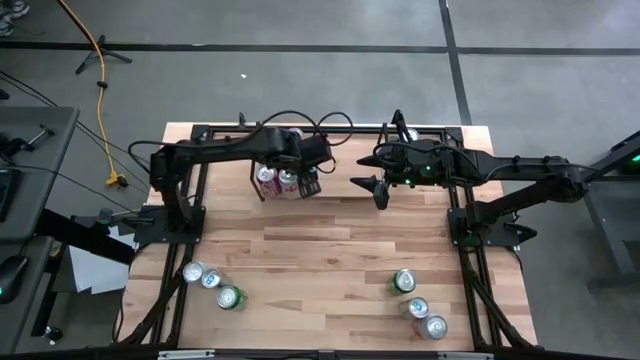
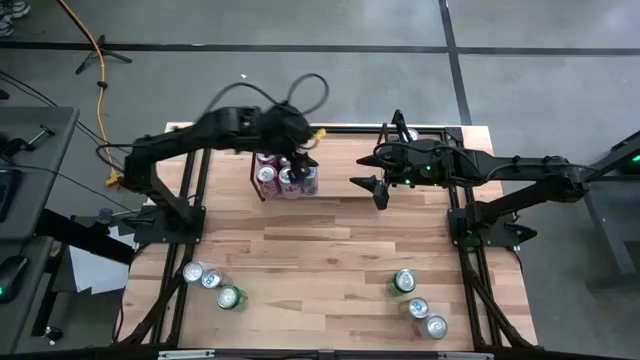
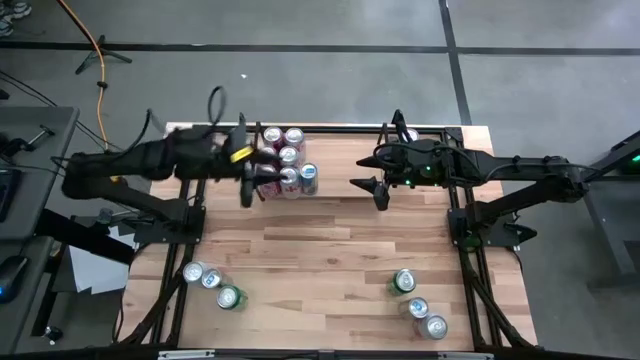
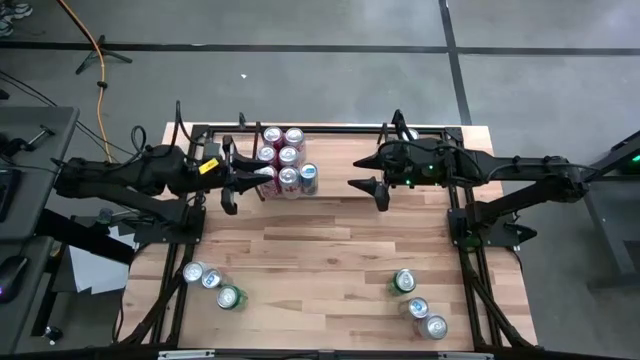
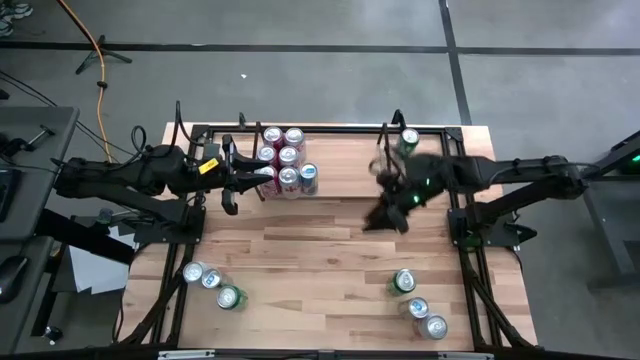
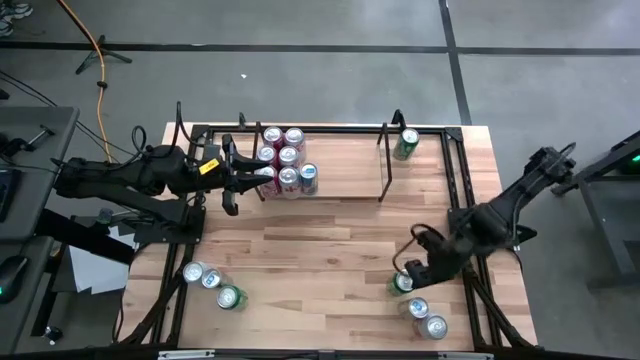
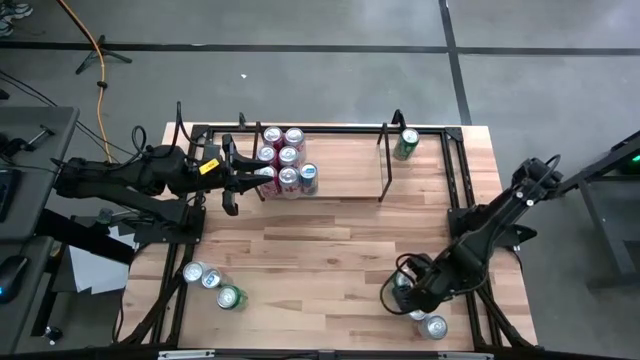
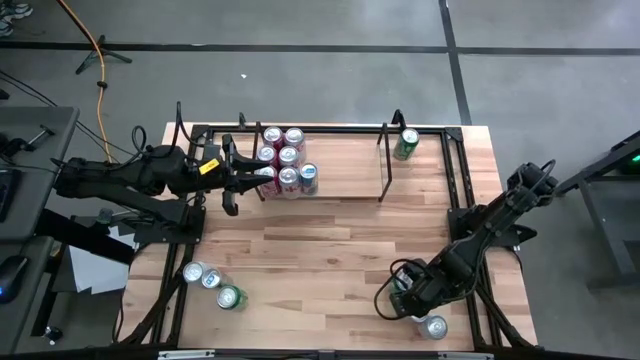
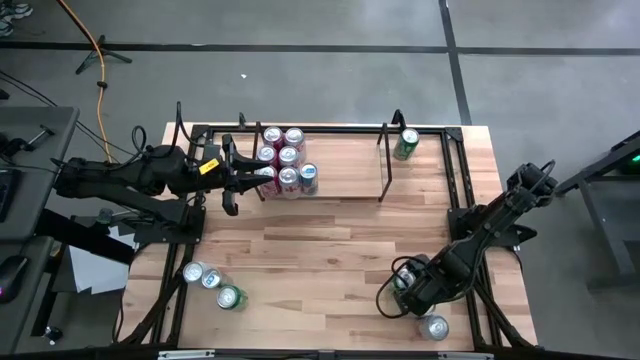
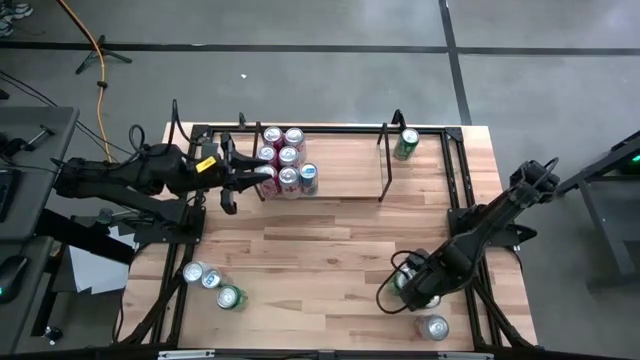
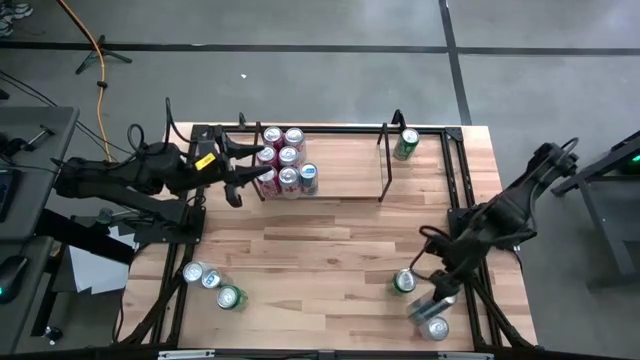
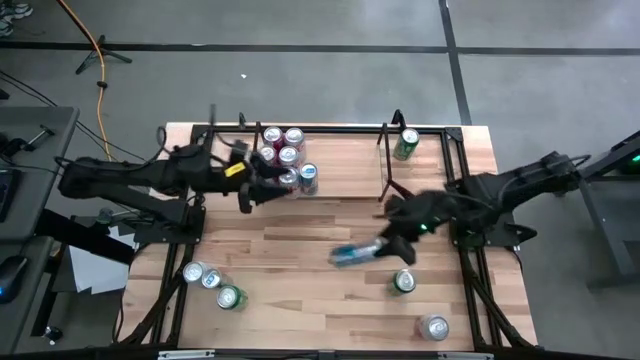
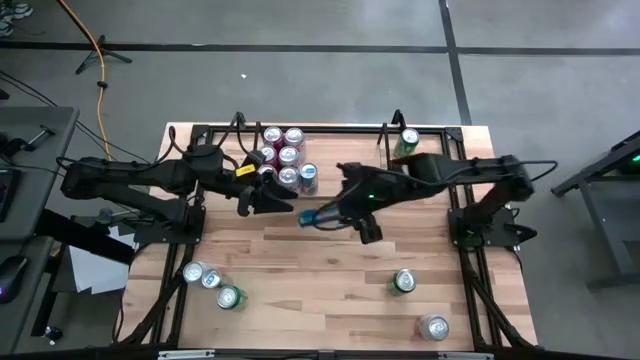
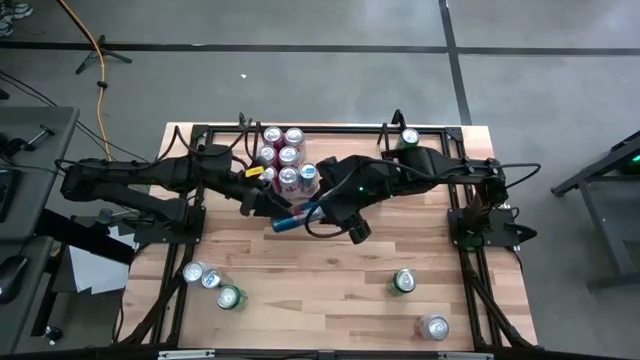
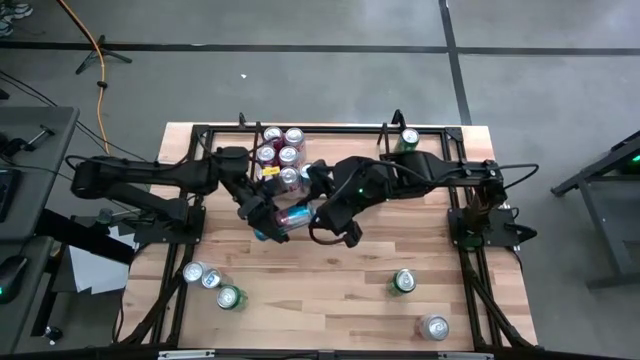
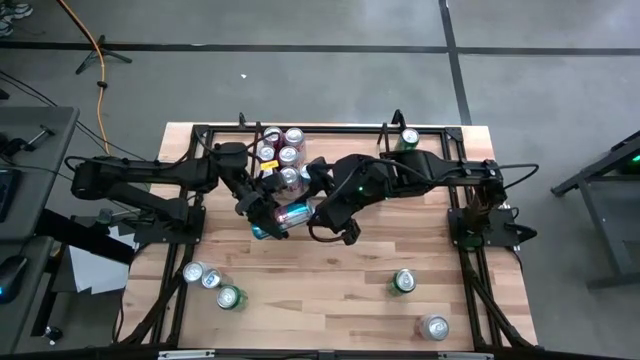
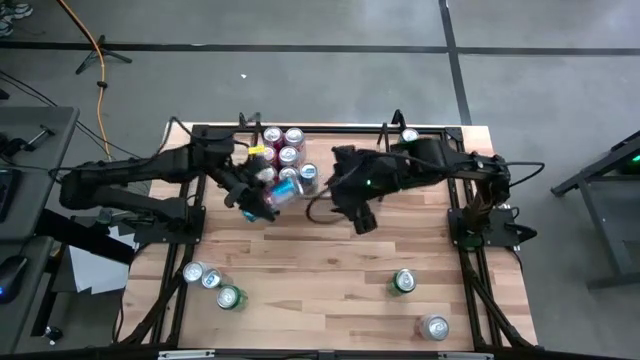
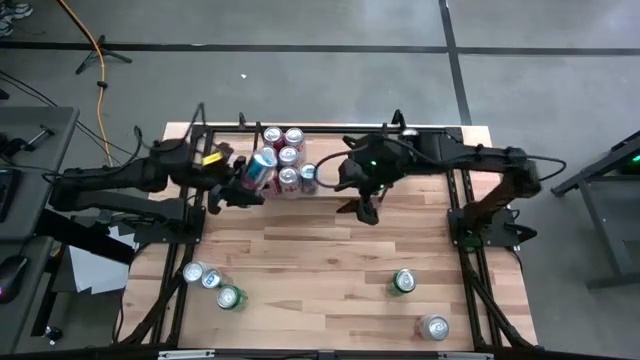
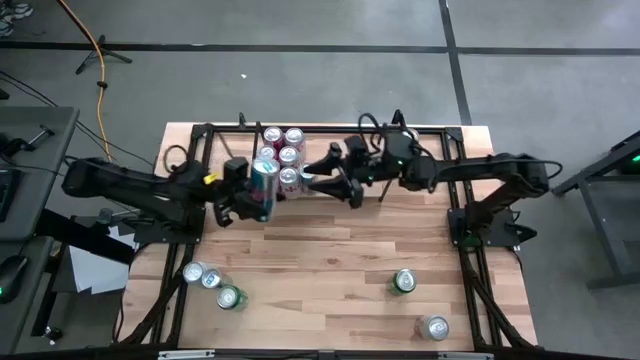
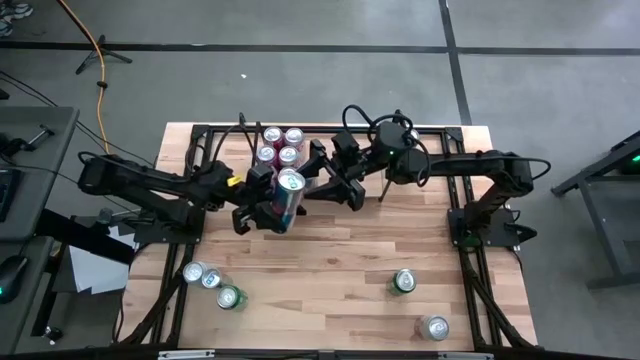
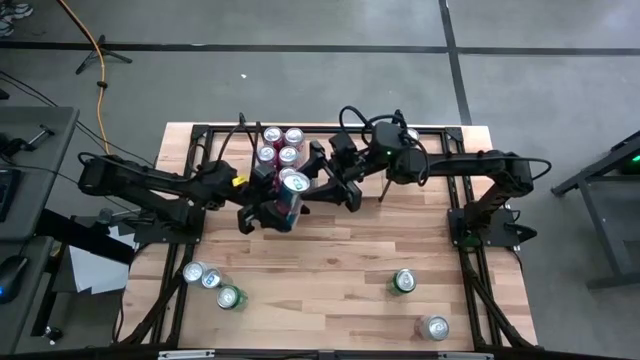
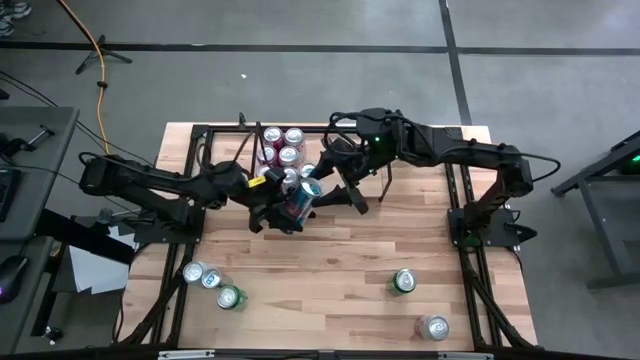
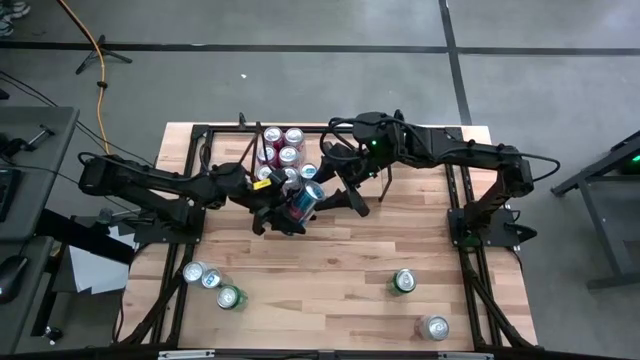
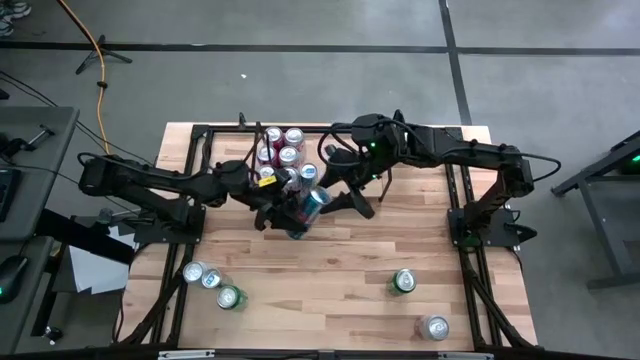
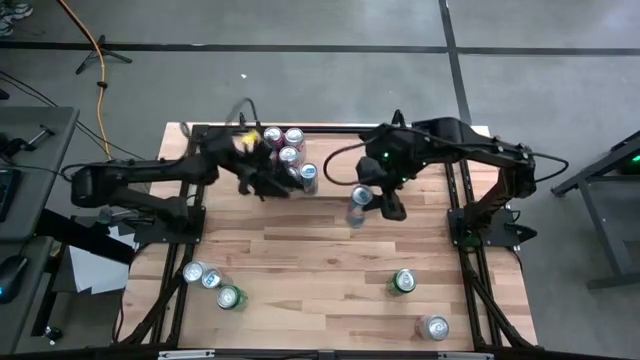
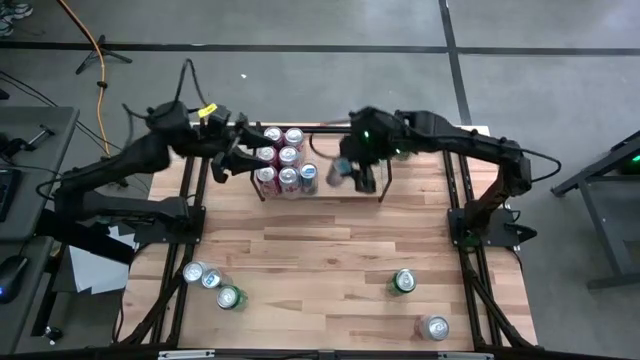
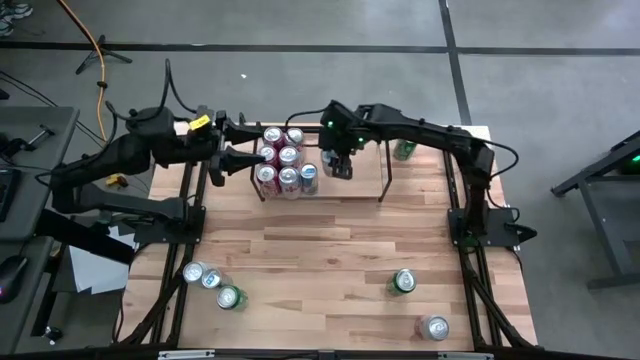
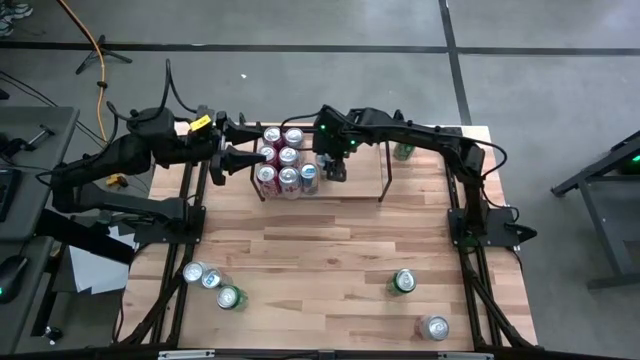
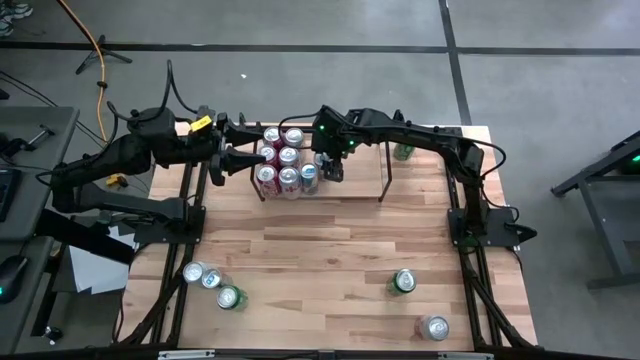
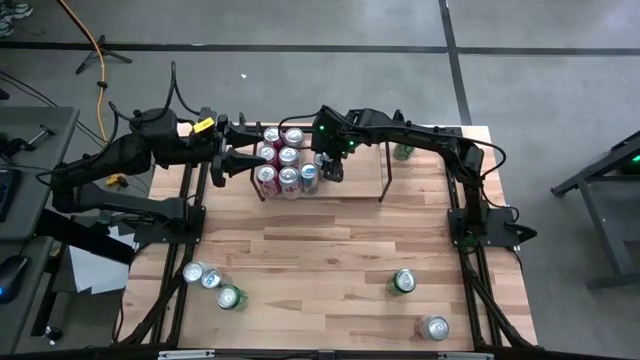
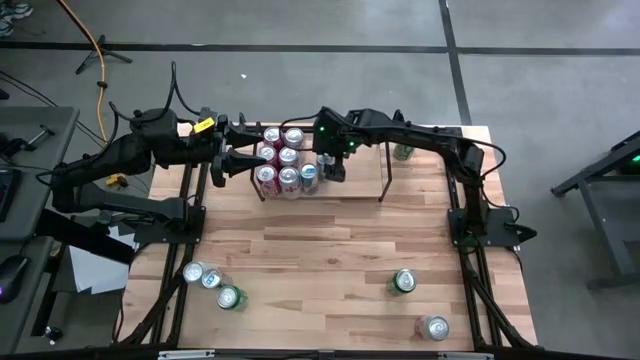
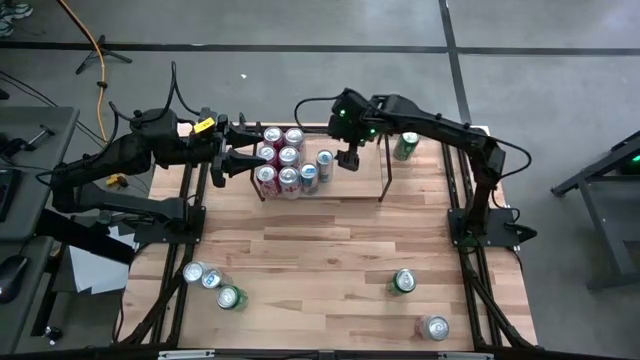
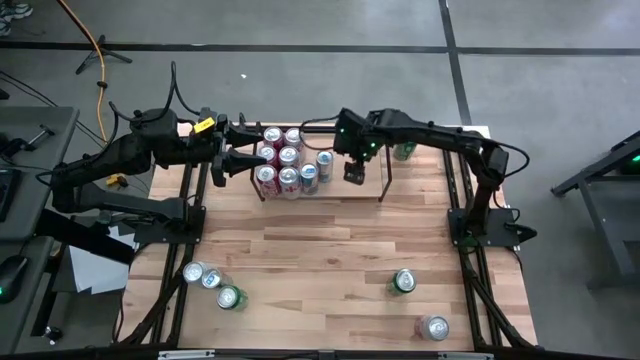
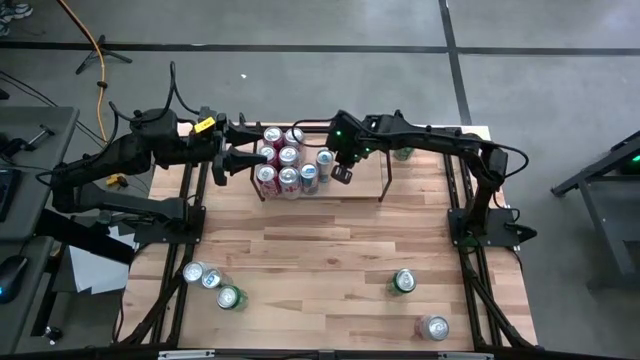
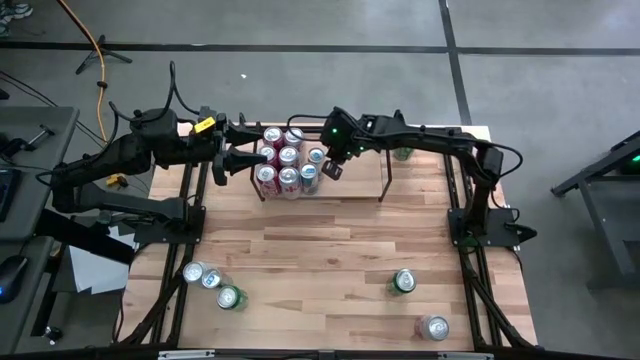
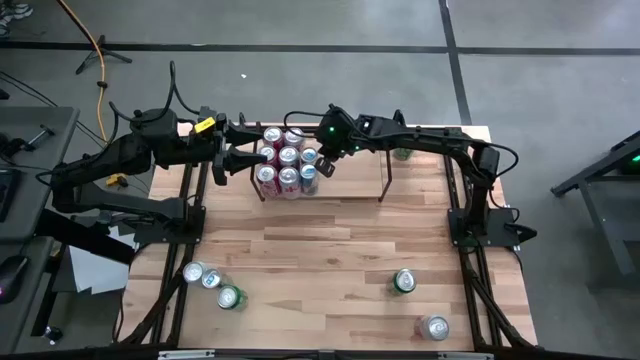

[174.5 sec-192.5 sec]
Task: Place canned beverage on shelf
Put the right blue soda can on the shelf aligned with the other blue soda can

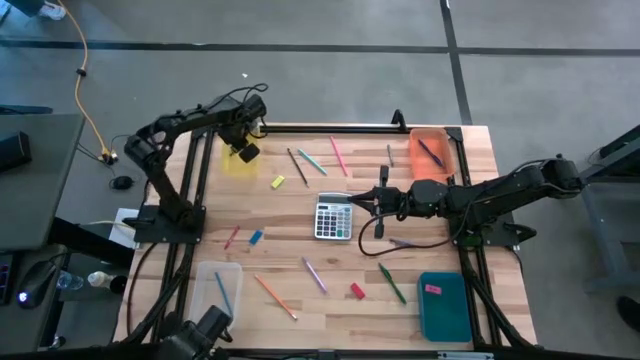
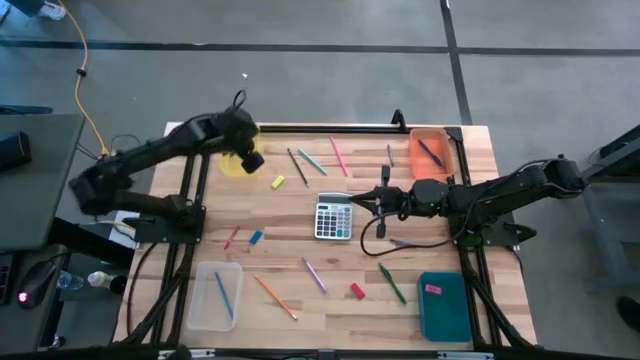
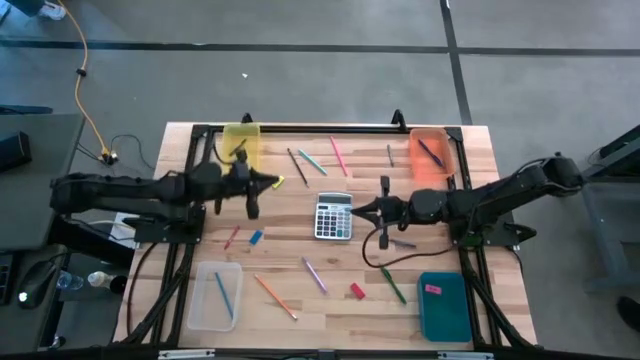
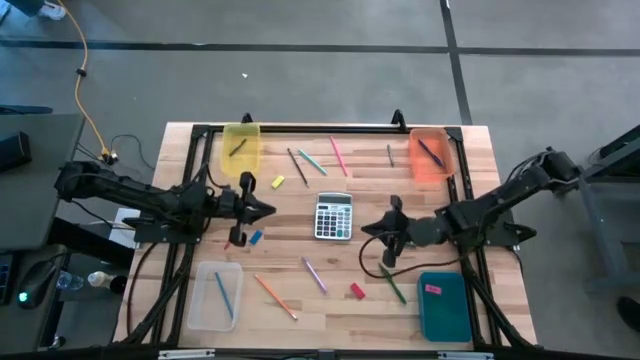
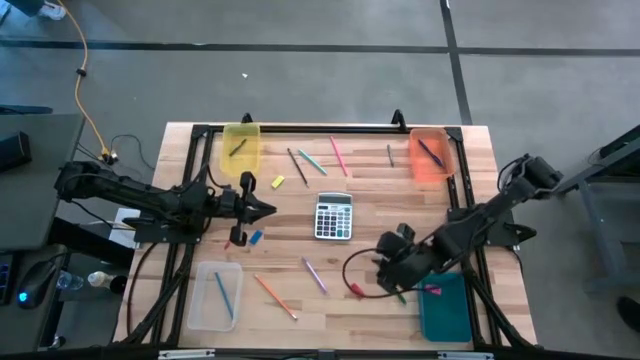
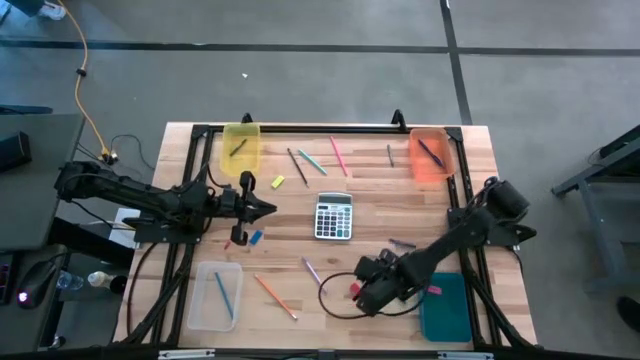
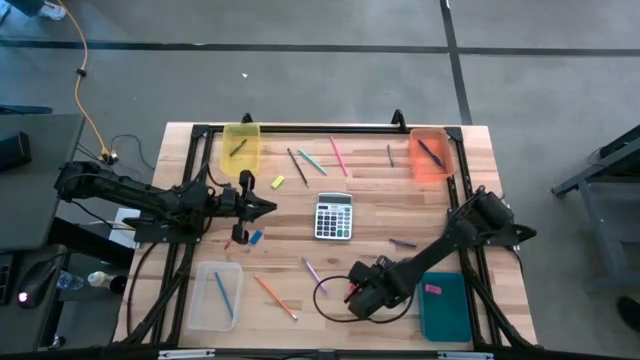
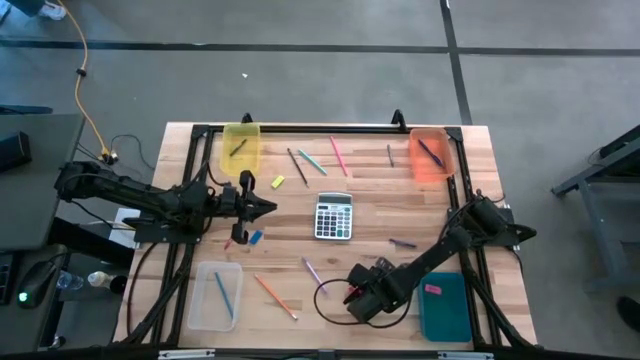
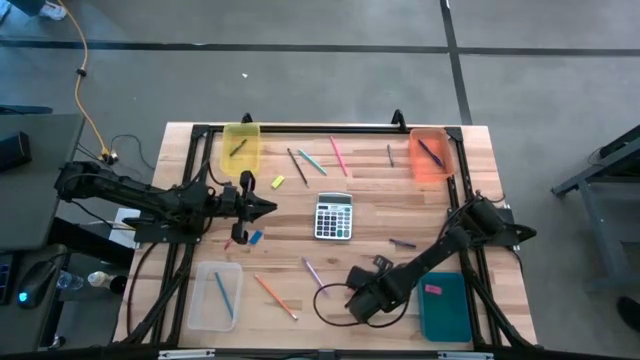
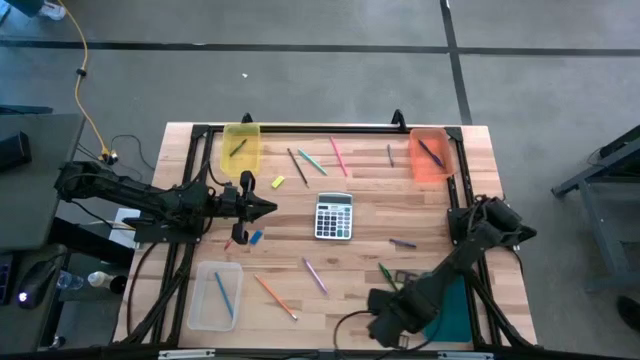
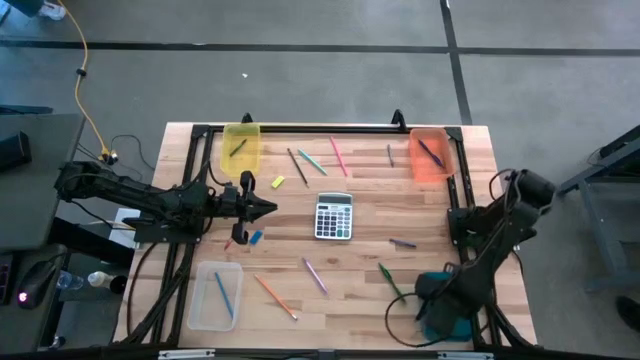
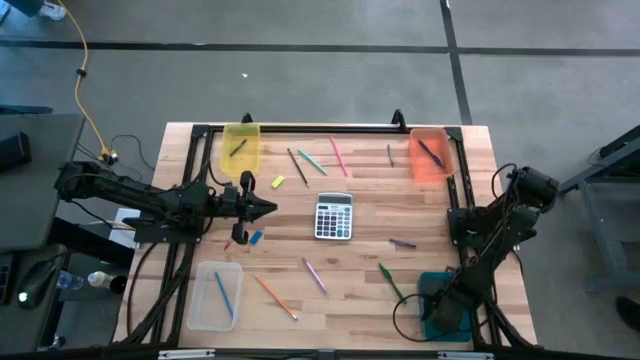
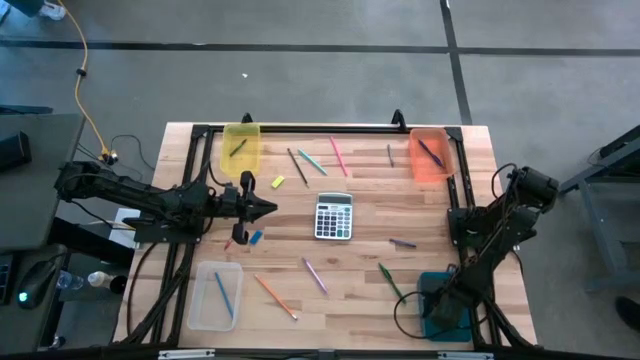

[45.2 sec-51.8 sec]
Task: Sort crayons/erasers/pens/pencils in bins
Put the red eraser into the blue bin
